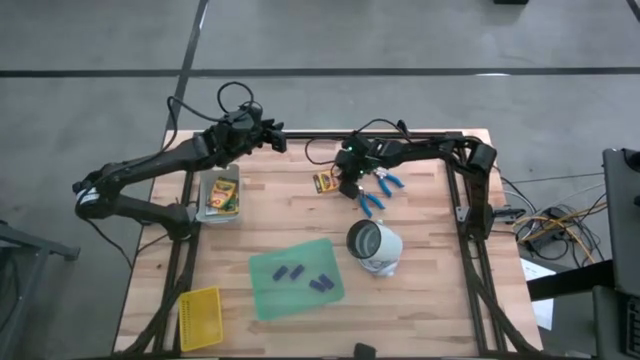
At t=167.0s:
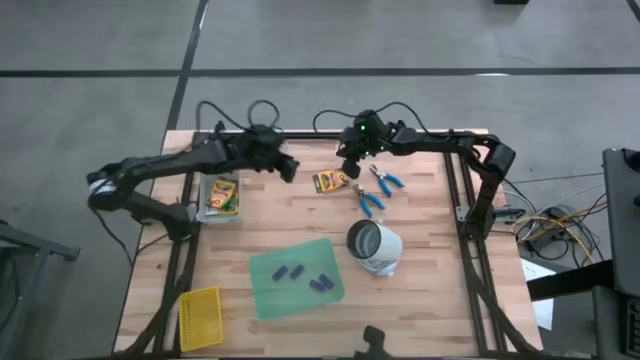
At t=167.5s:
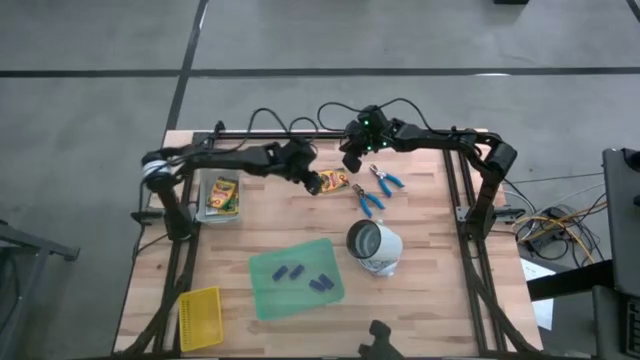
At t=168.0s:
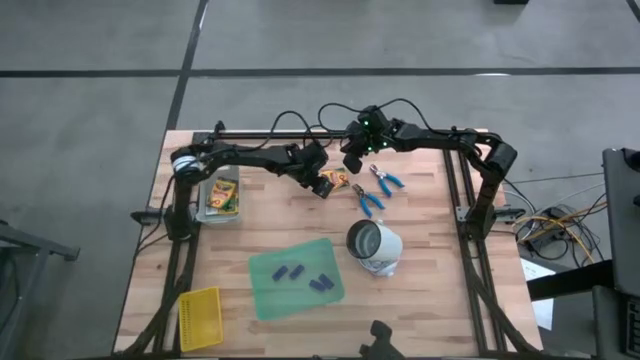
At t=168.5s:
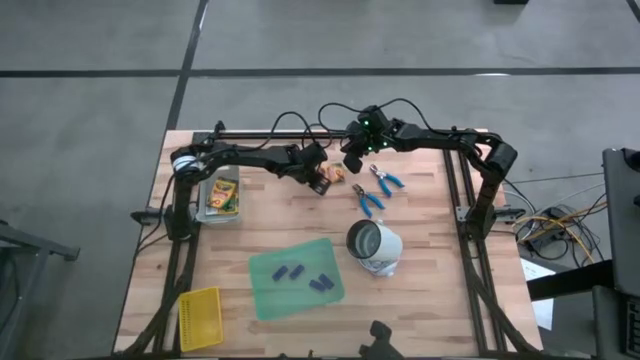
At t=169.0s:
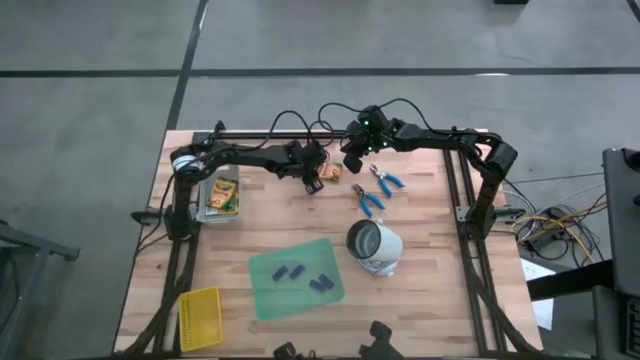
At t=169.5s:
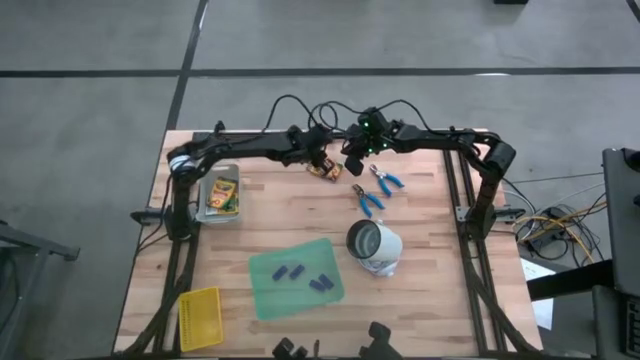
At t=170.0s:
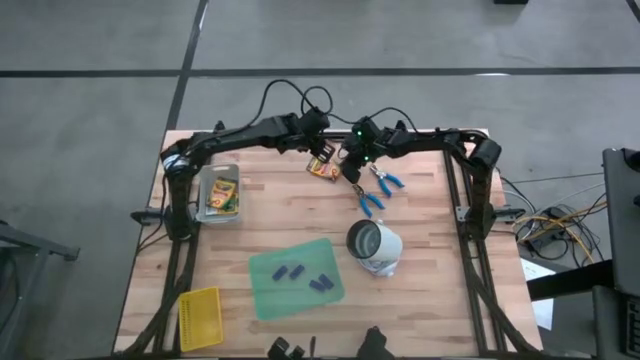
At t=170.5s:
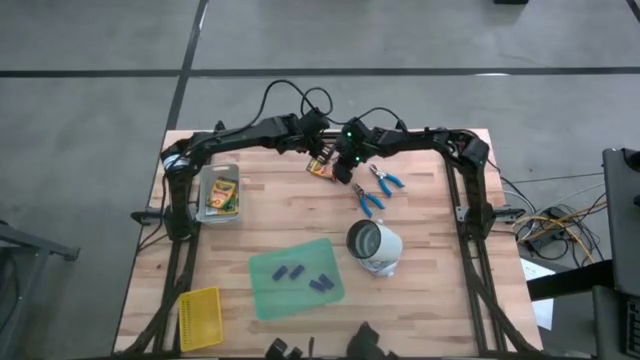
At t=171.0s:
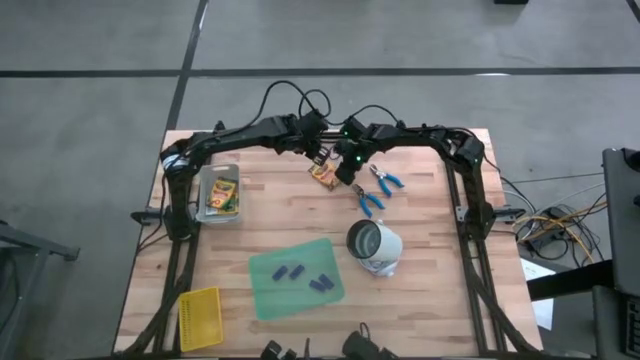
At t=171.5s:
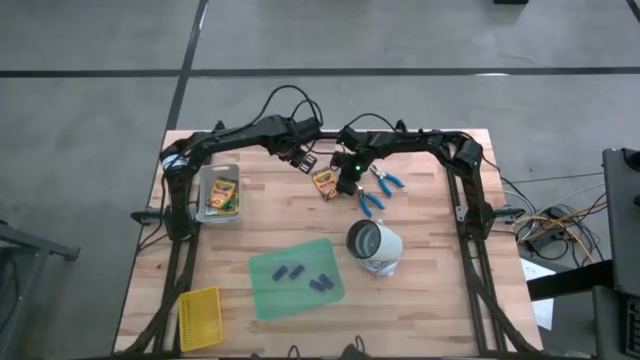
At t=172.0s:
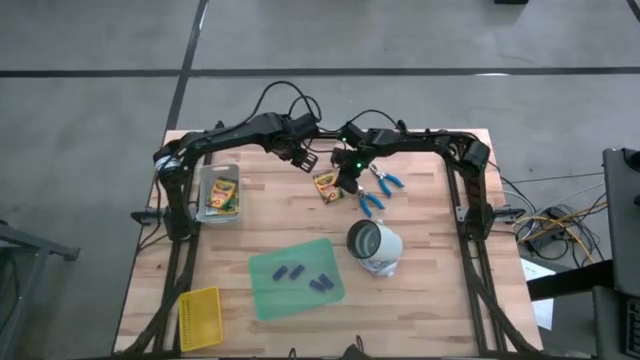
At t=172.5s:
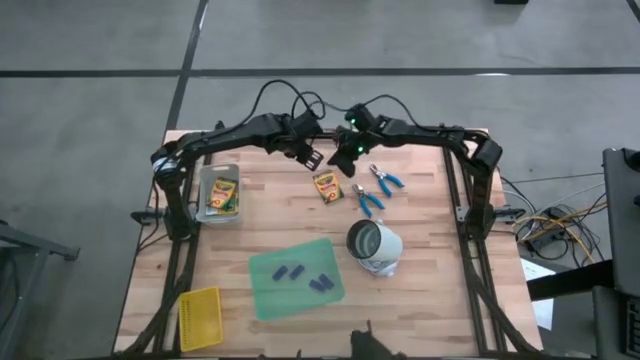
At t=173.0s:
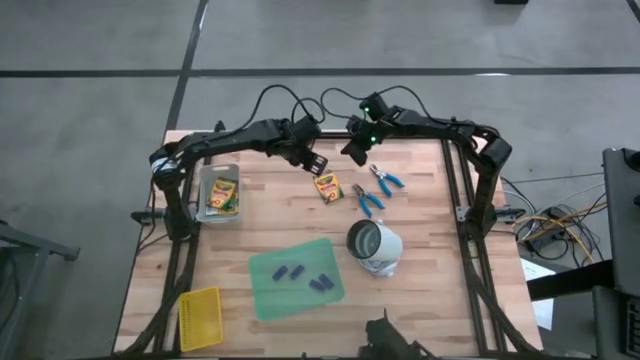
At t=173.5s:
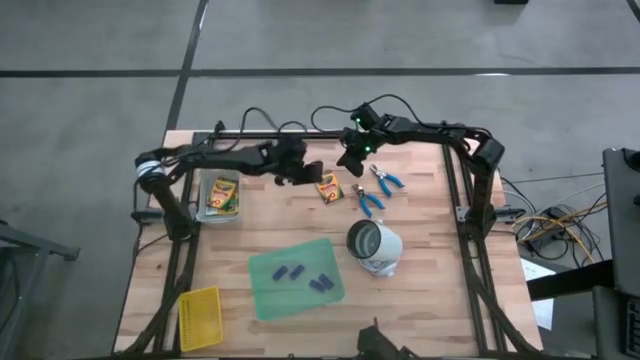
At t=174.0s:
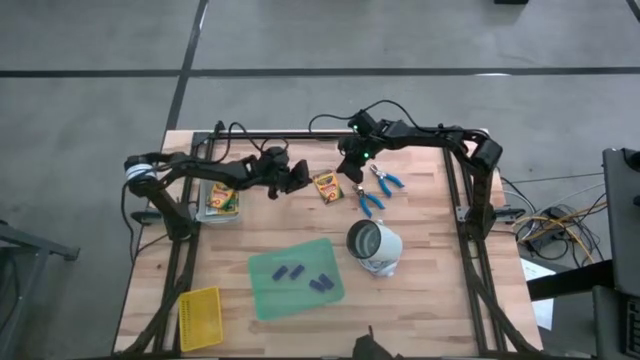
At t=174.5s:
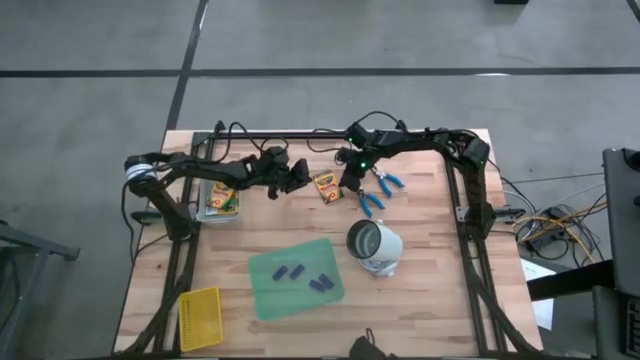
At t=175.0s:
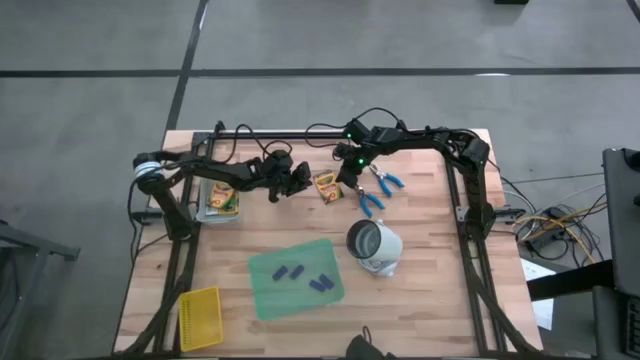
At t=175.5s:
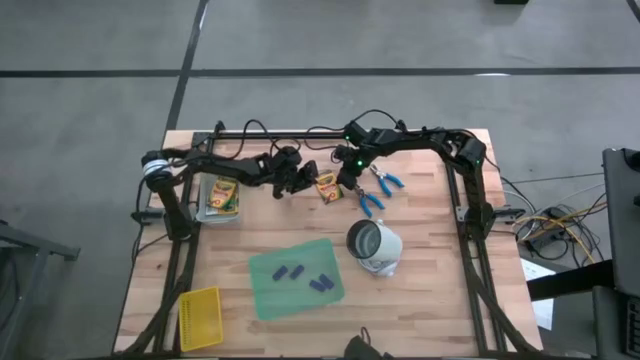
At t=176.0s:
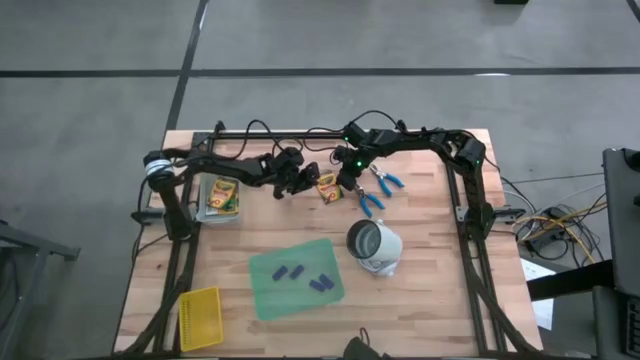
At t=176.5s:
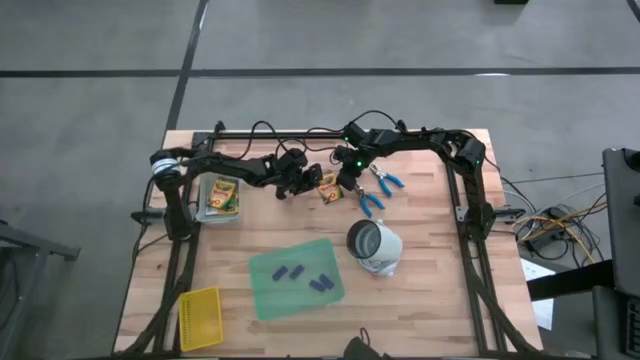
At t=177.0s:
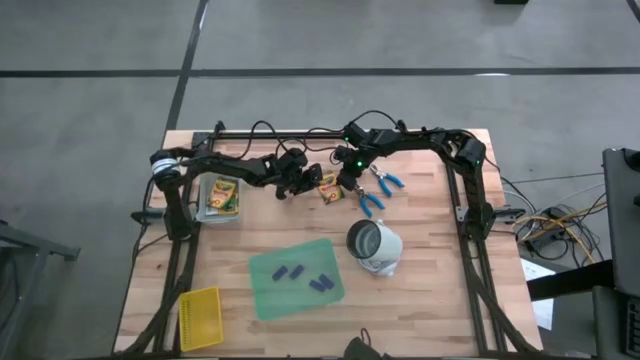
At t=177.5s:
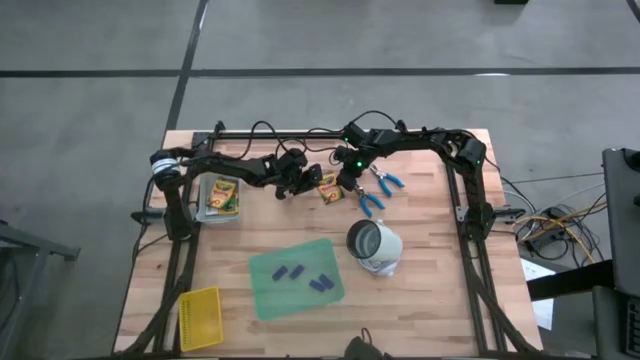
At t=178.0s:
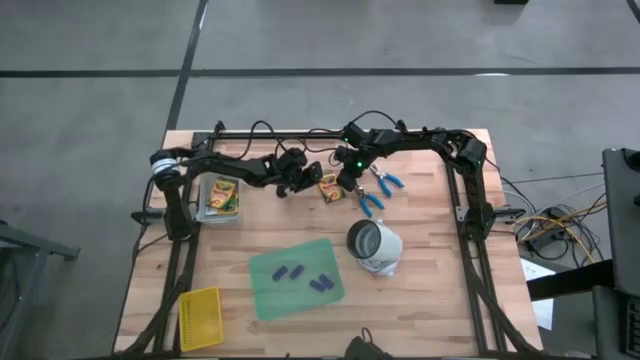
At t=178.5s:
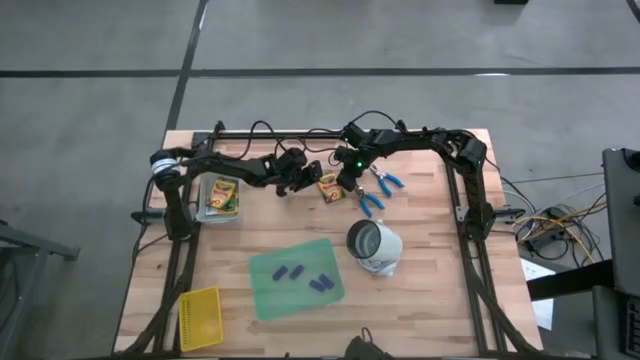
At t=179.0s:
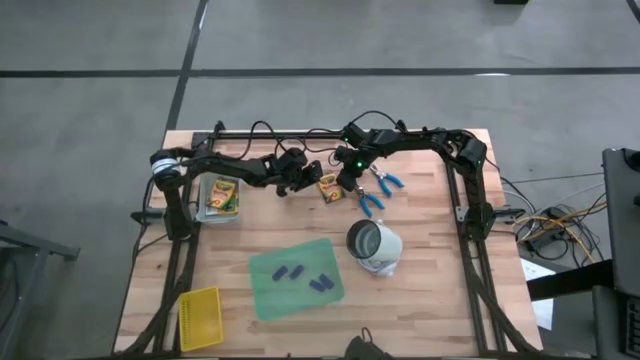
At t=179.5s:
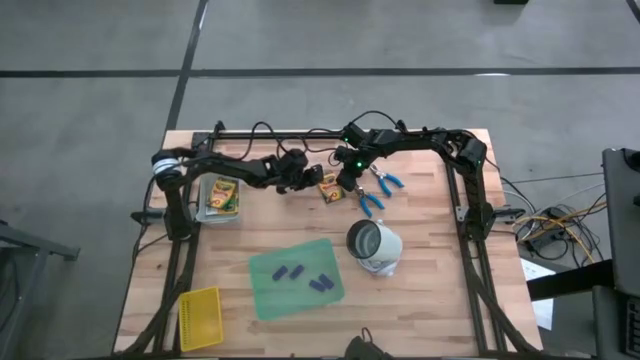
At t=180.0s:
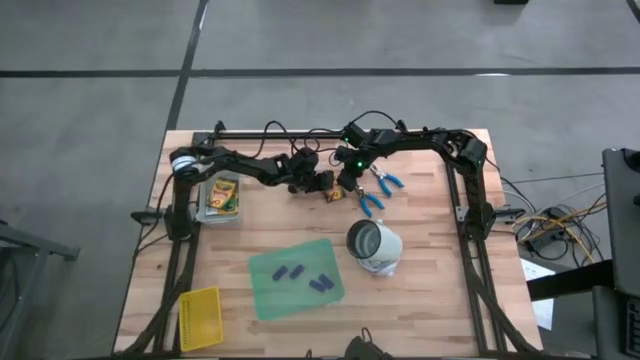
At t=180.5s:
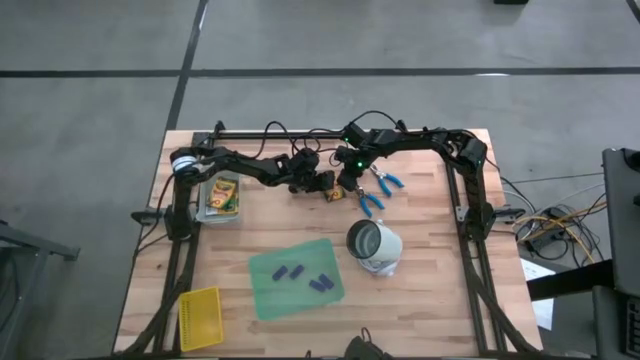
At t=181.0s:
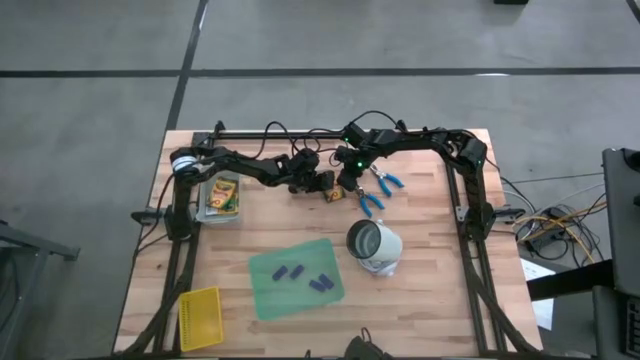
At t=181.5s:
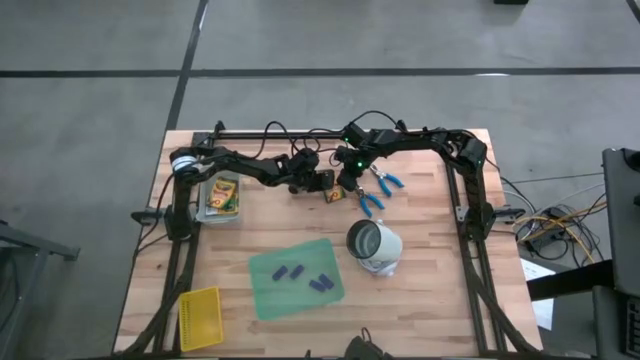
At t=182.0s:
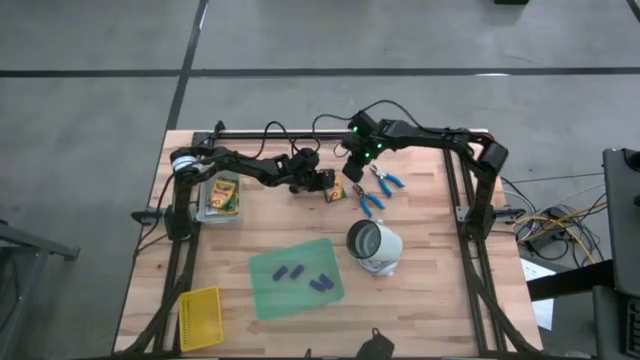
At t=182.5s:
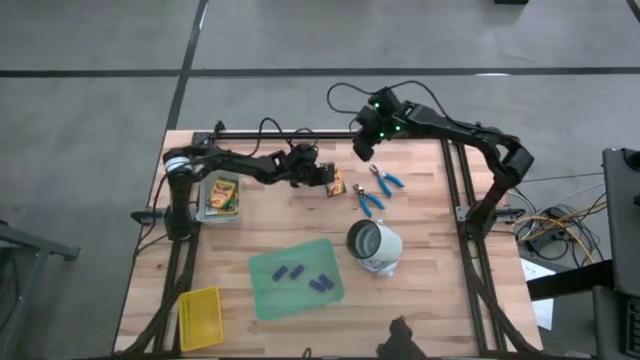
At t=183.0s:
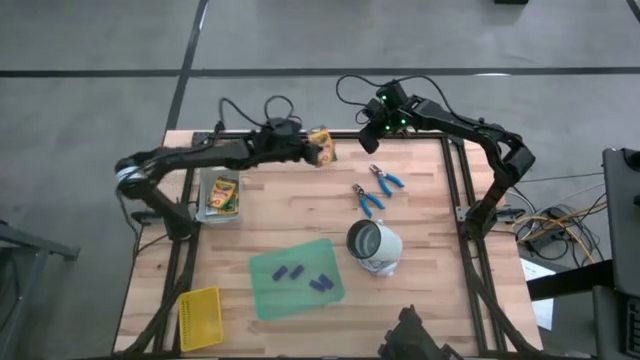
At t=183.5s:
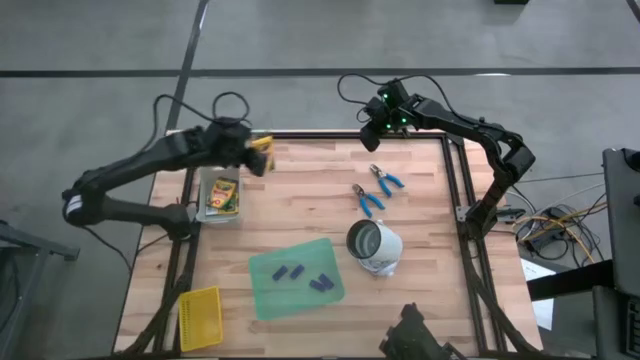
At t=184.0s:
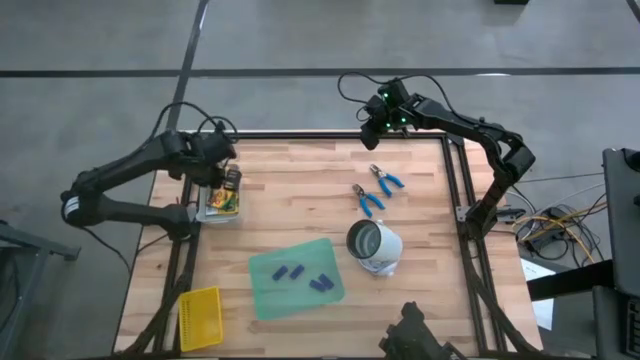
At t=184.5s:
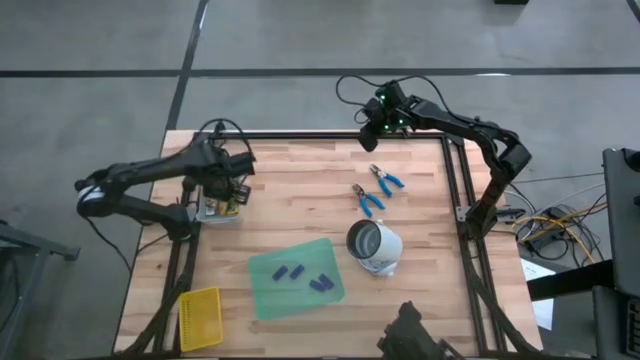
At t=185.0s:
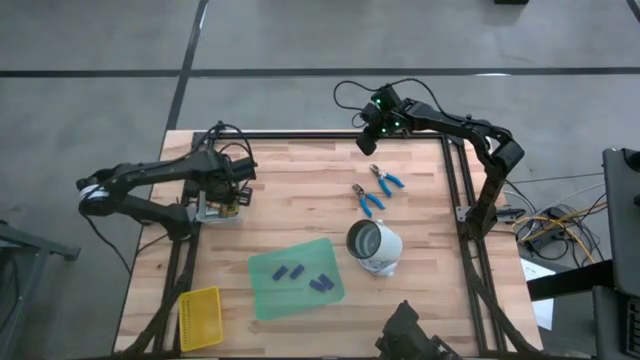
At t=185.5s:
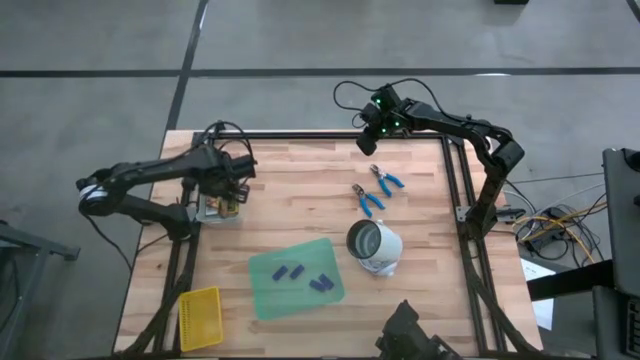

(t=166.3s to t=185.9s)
Task: Pick & Place School Supplies
Put the yellow crayon box into the gray bin

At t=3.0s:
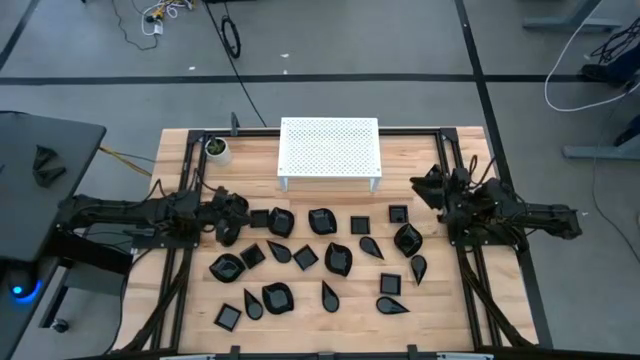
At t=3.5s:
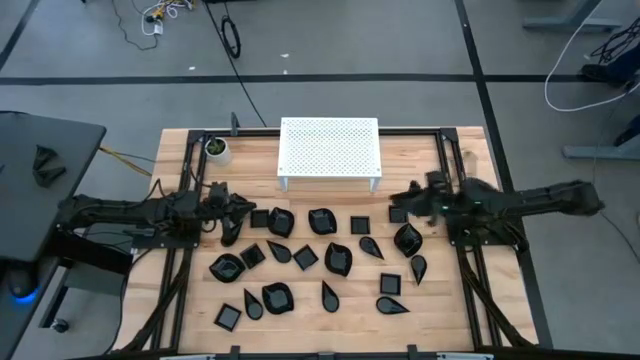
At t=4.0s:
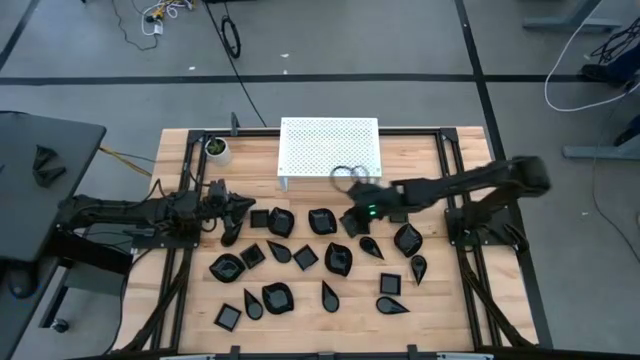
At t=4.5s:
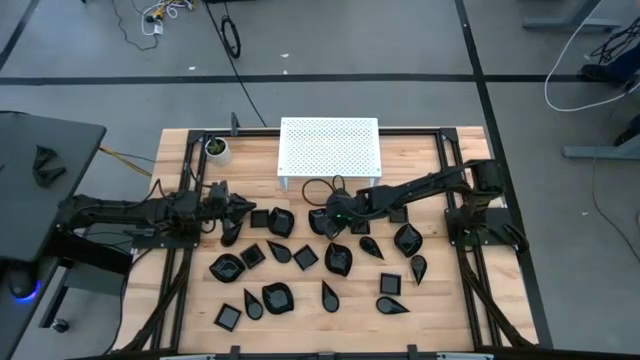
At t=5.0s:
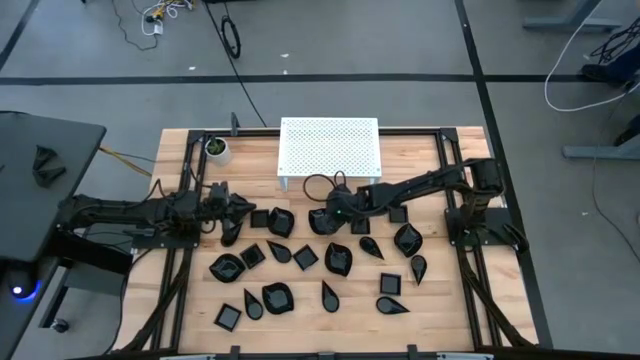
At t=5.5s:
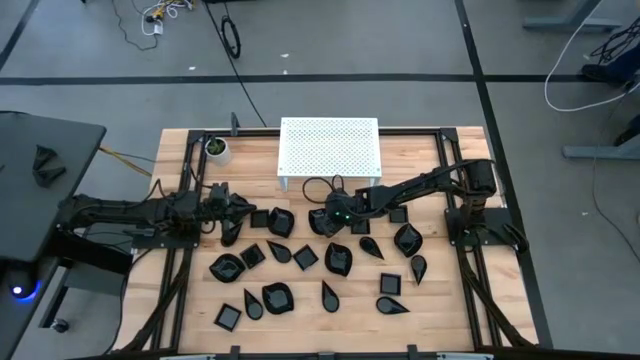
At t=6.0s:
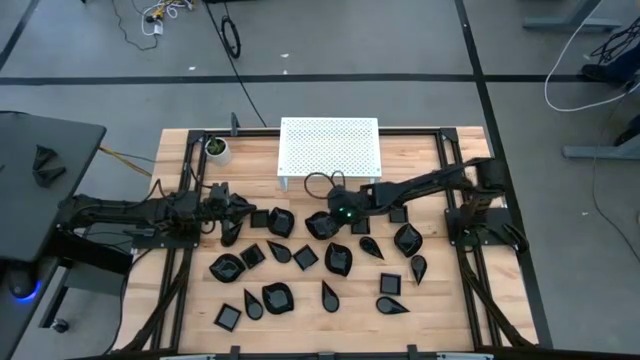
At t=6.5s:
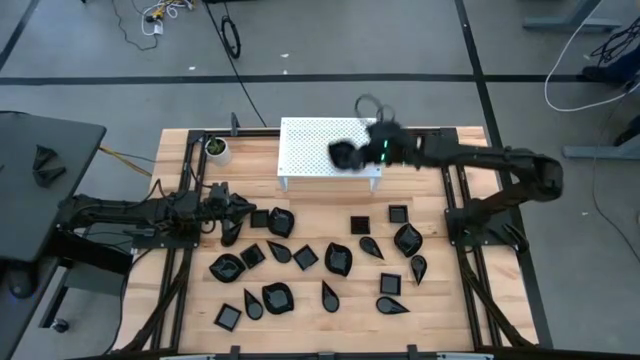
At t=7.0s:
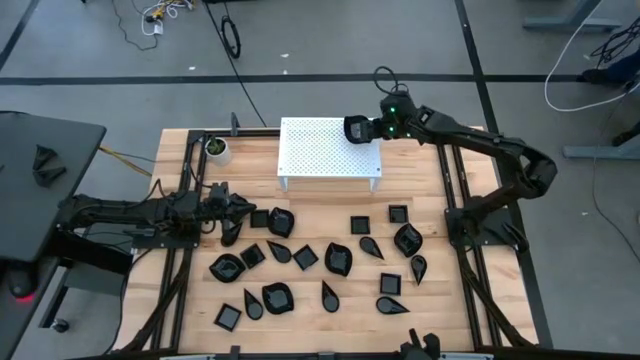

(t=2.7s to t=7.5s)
Task: Pick & Place Mini shaped plates
Put the black leaf-shaped plate on the shelf
